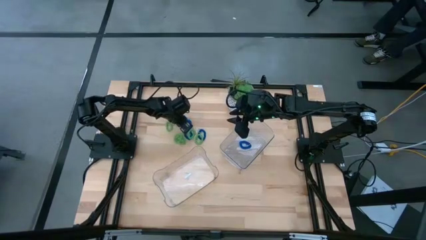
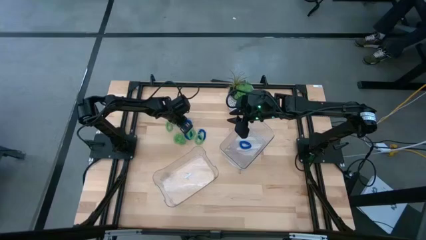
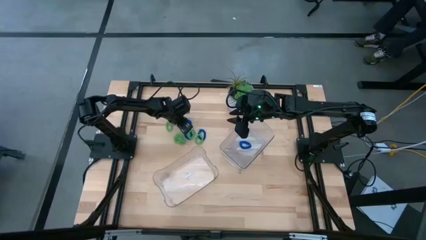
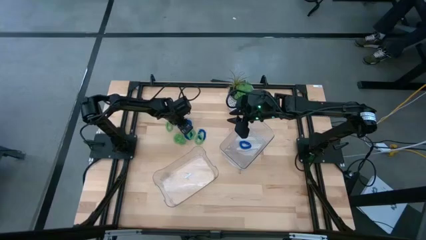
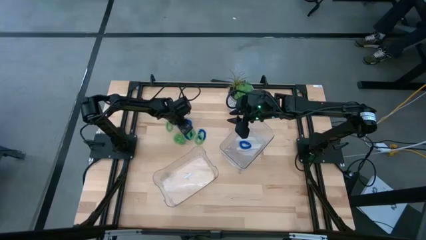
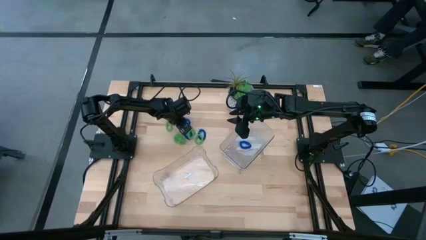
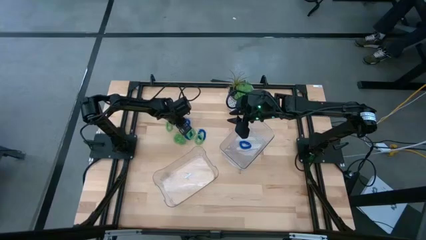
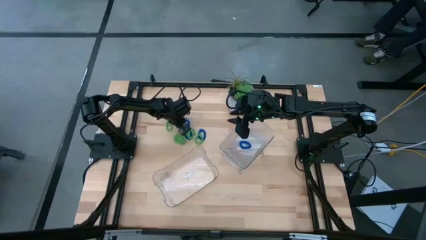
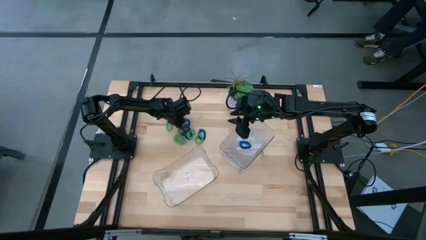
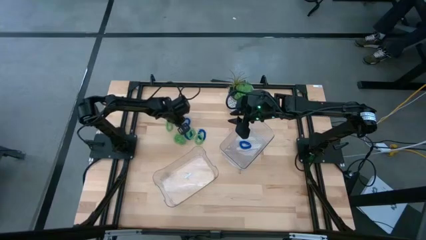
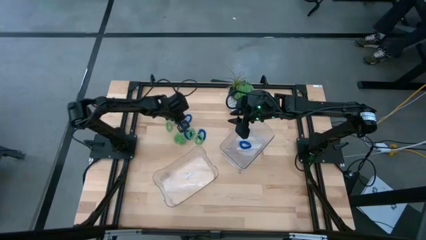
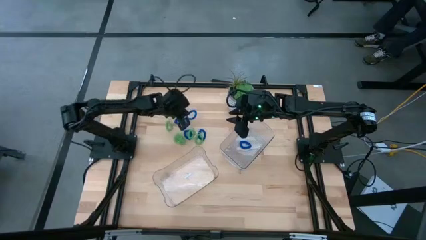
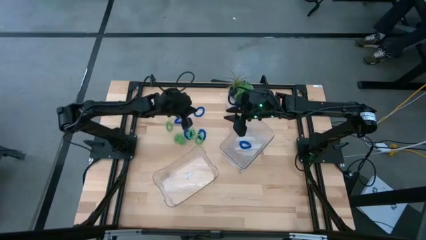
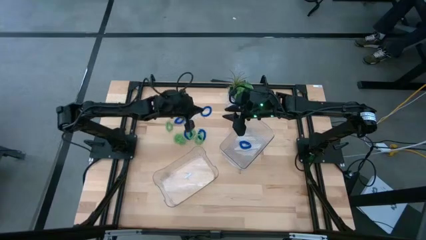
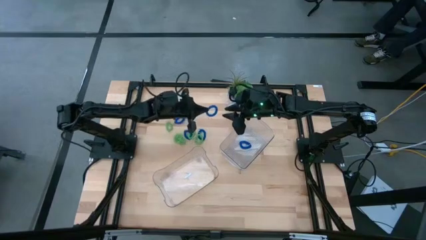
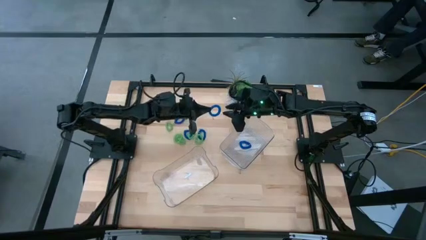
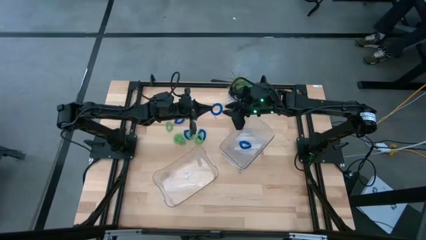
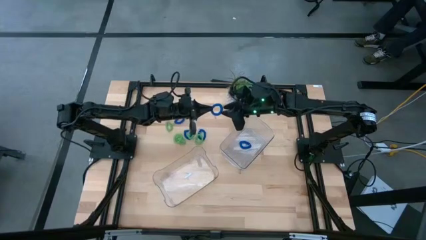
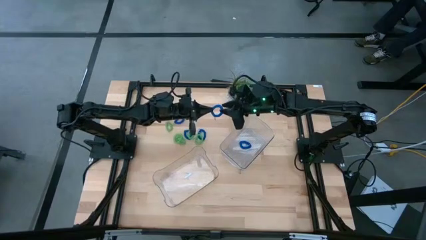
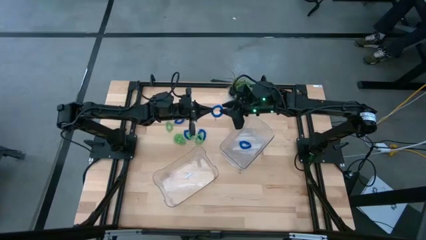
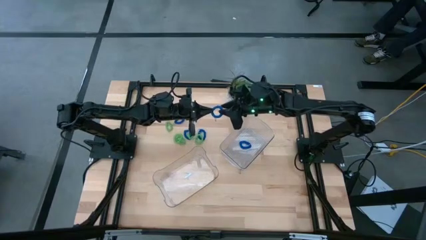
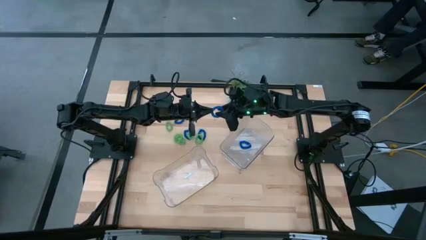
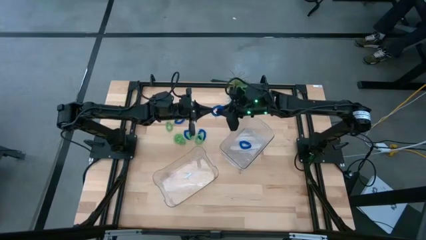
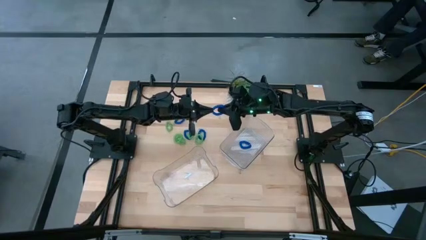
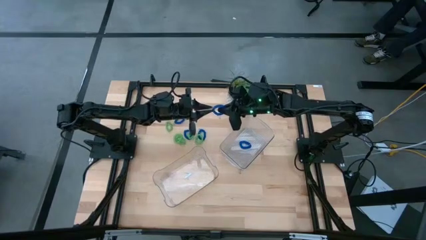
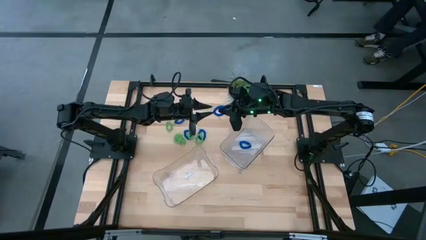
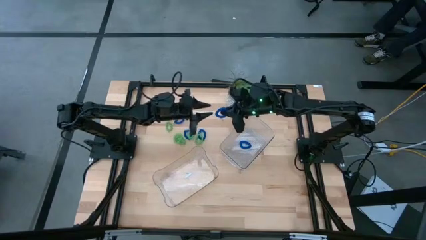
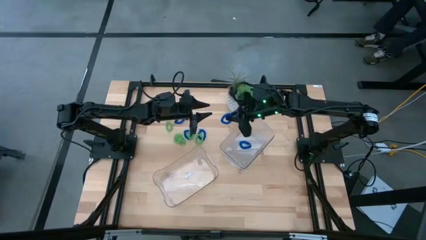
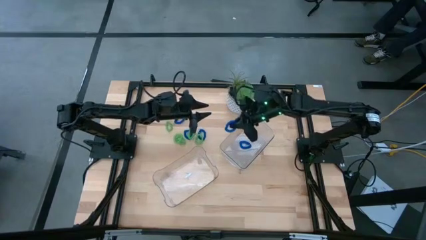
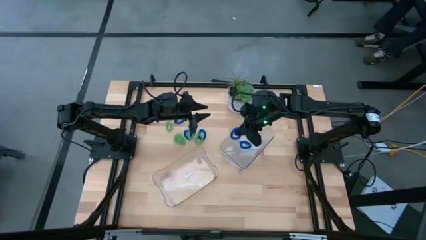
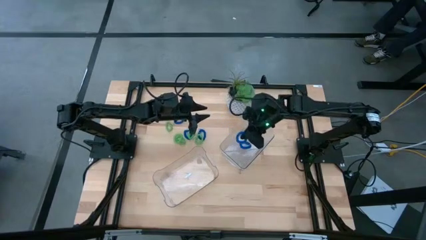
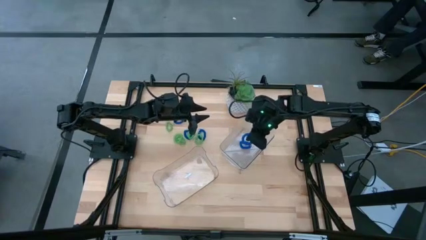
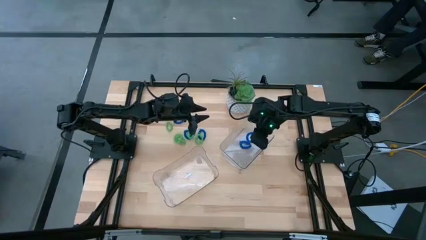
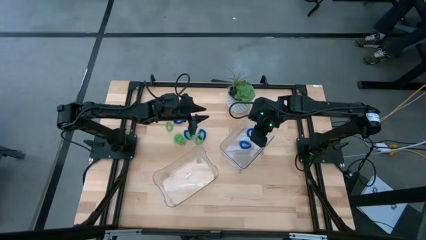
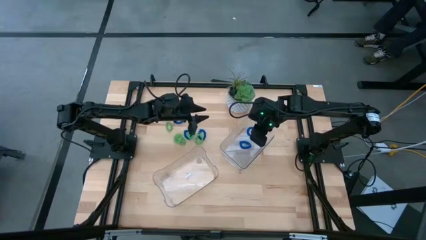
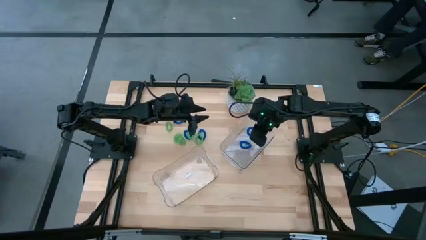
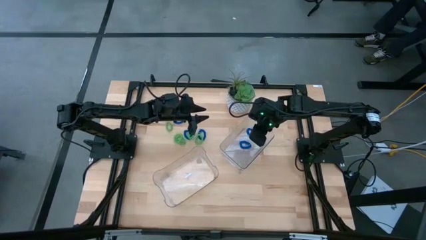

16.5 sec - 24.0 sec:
Task: Sort spring keychains
Put the blue spring keychain into the top transparent bin

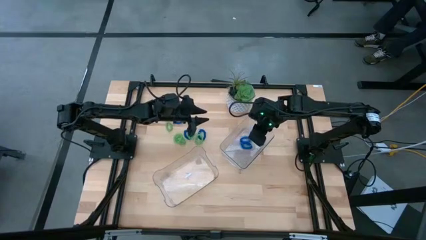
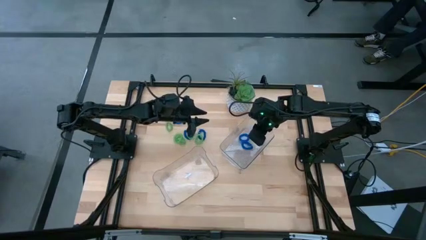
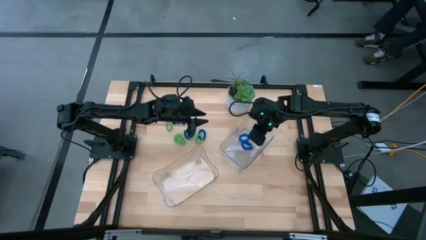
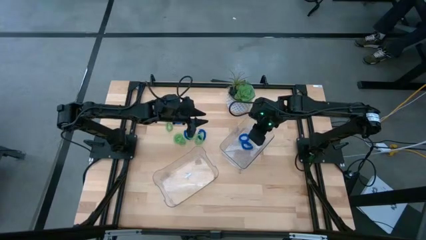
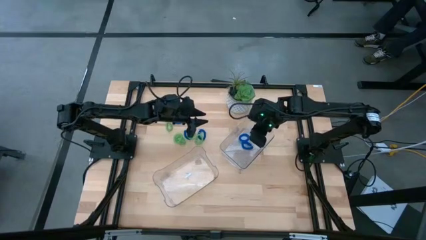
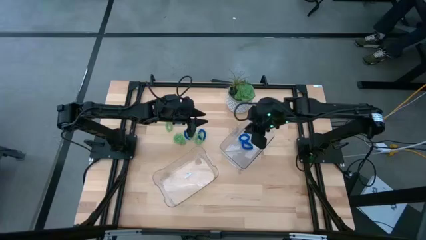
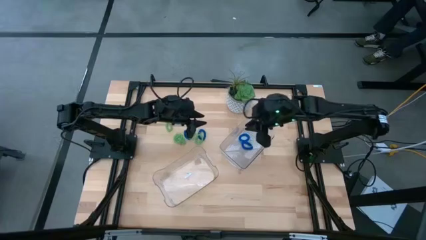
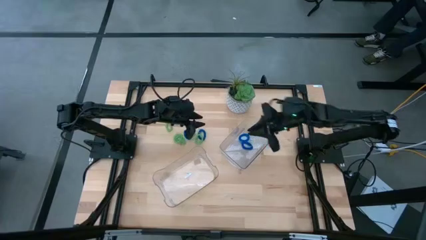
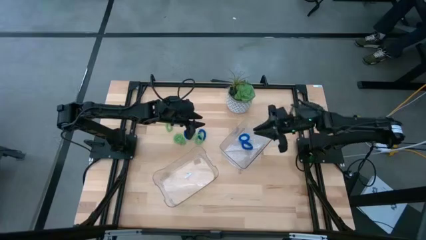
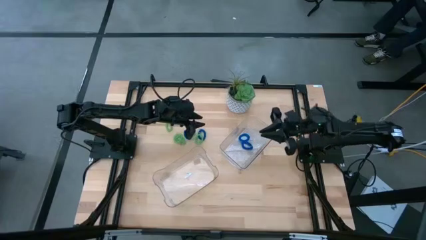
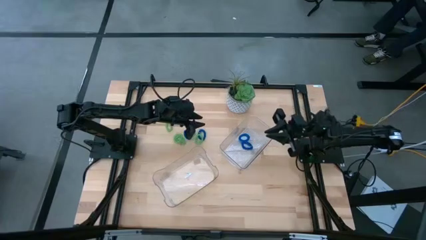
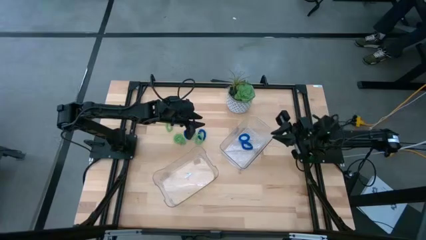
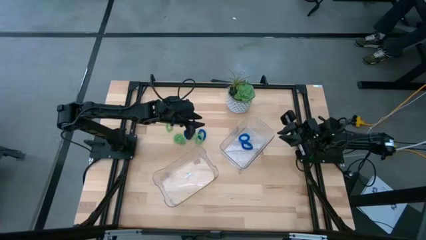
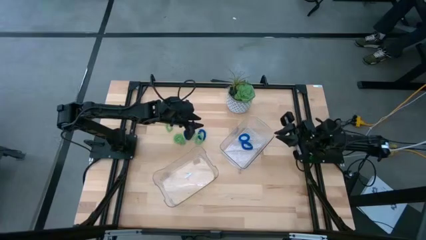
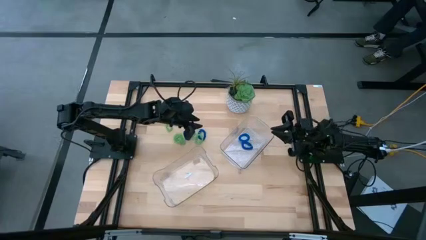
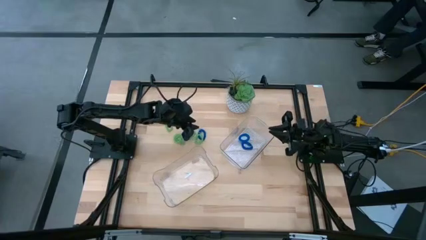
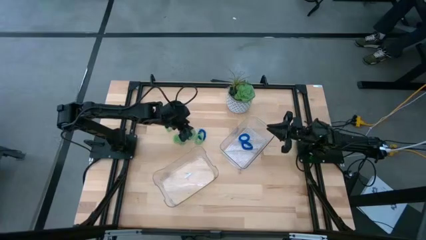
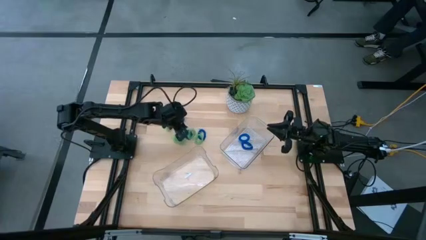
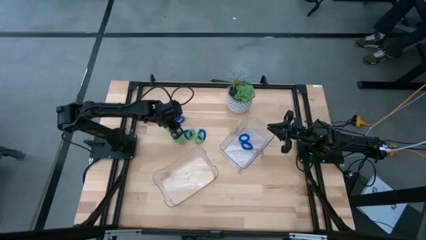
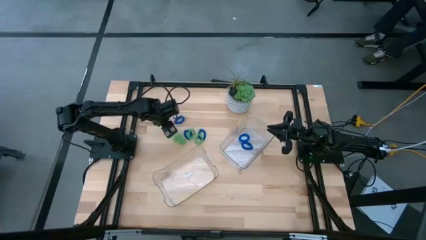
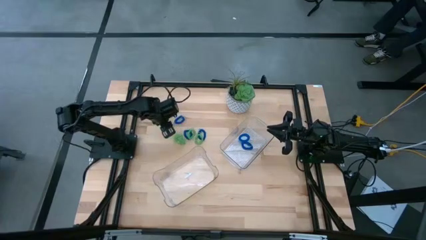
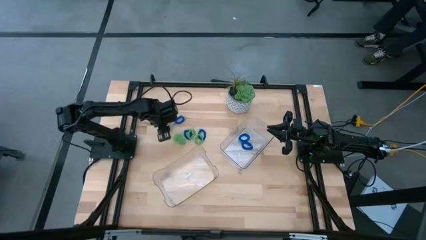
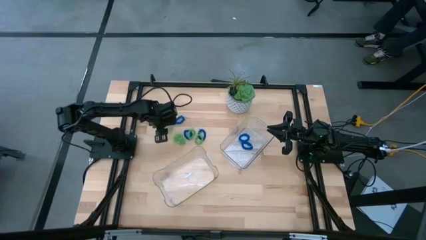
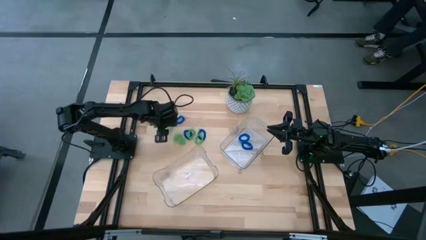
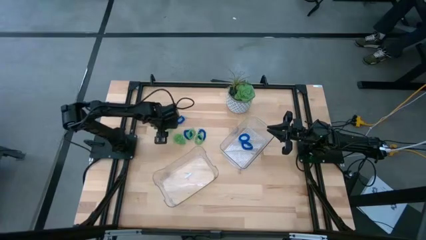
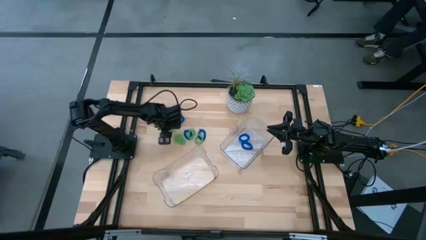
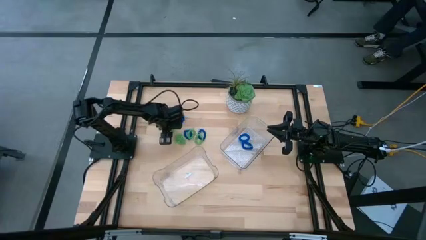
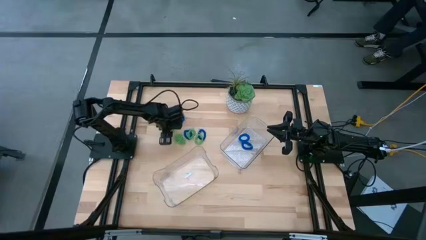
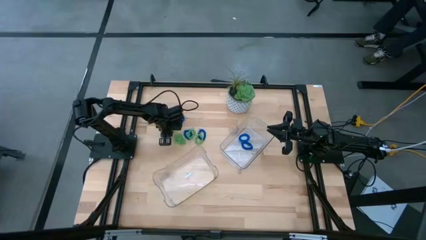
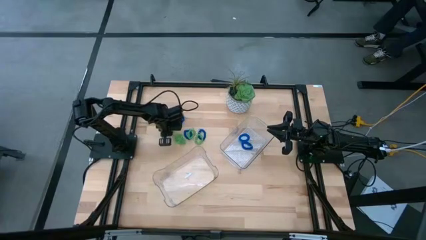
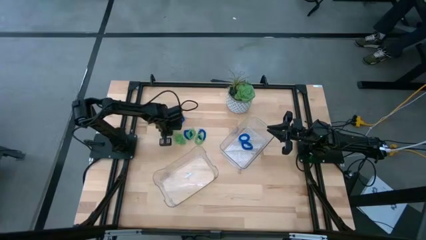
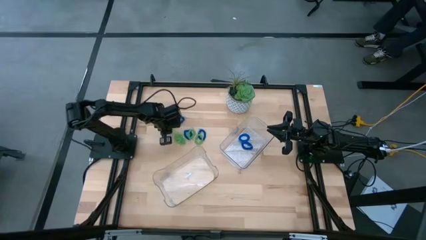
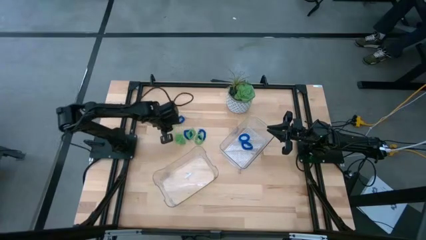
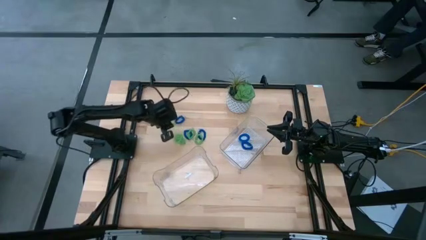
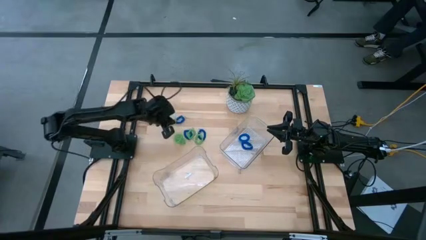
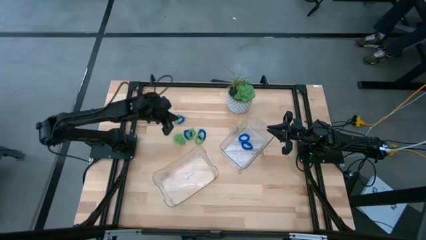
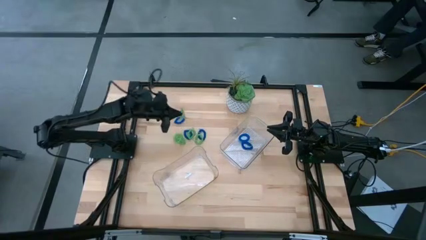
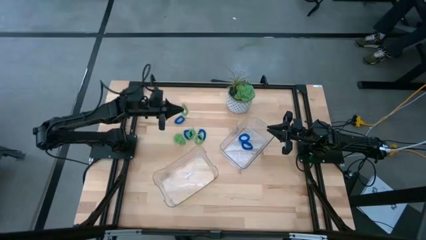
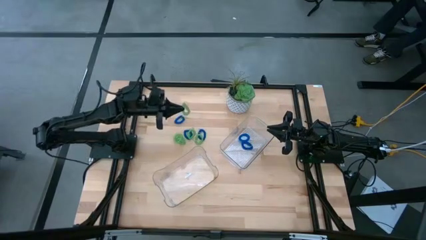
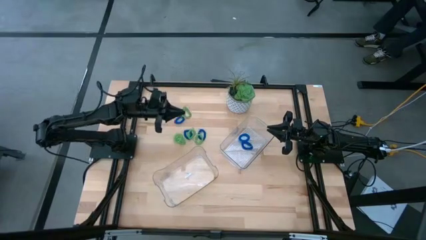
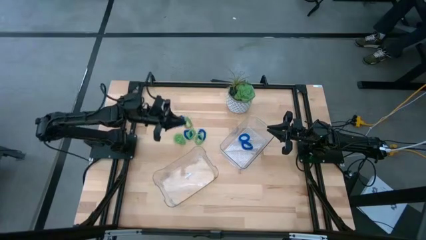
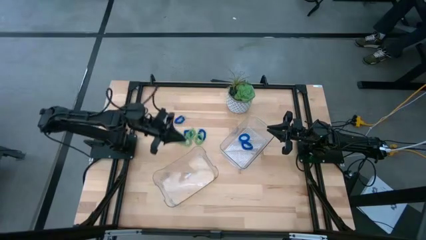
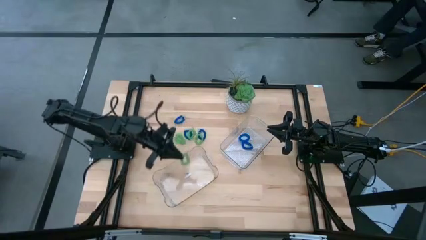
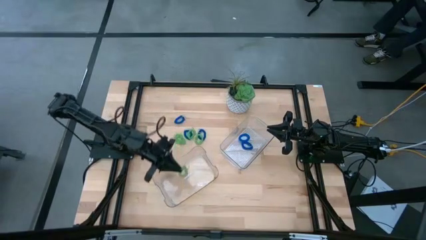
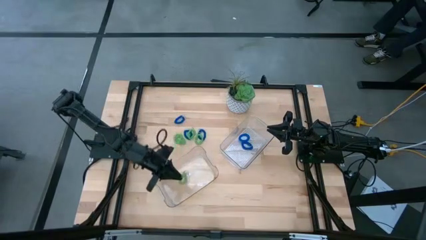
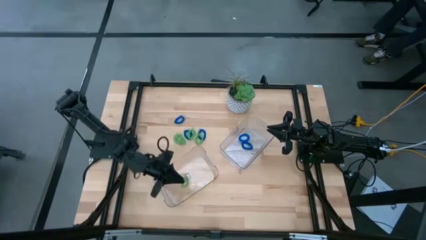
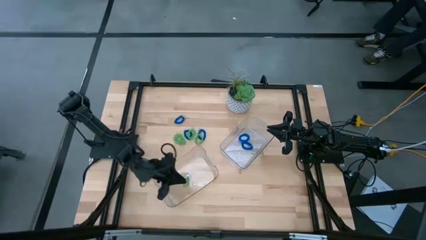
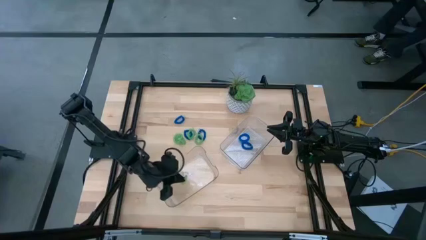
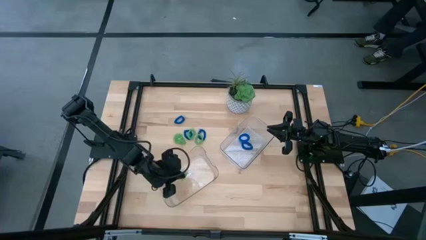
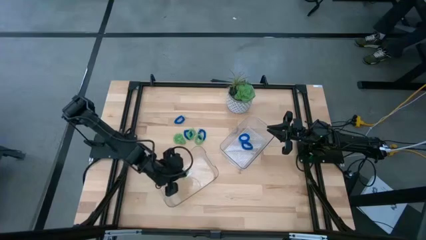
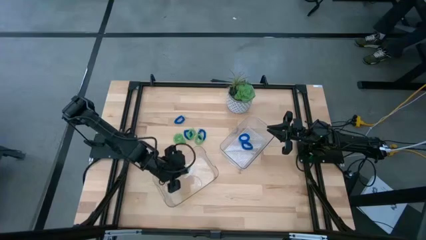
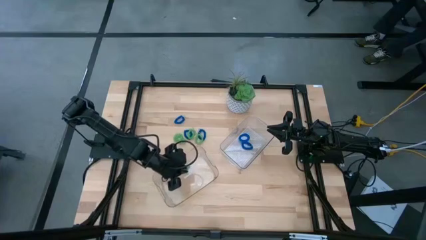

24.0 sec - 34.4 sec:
Put the green spring keychain into the bottom transparent bin
